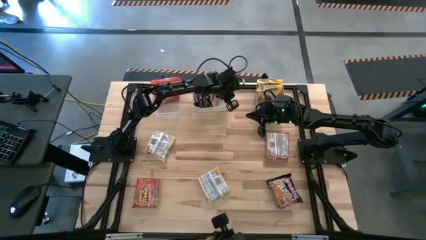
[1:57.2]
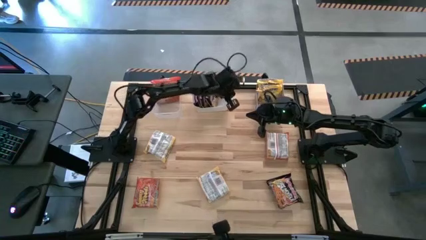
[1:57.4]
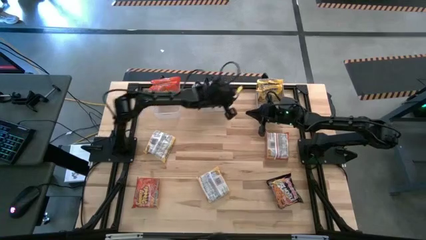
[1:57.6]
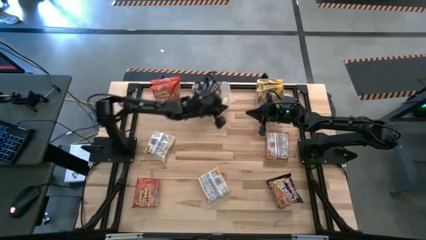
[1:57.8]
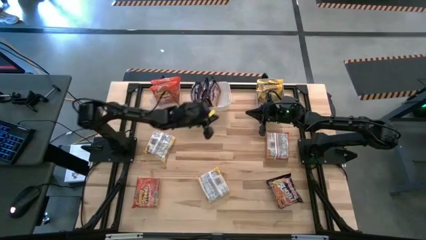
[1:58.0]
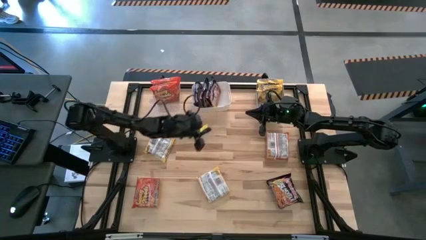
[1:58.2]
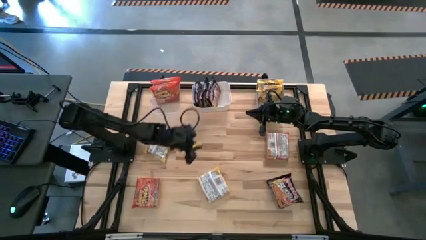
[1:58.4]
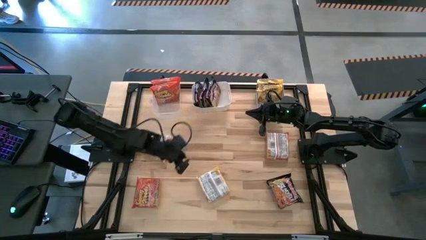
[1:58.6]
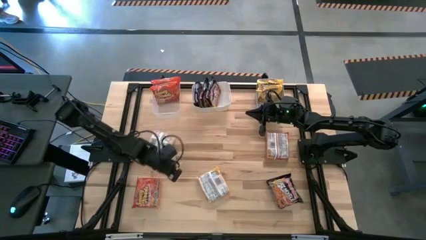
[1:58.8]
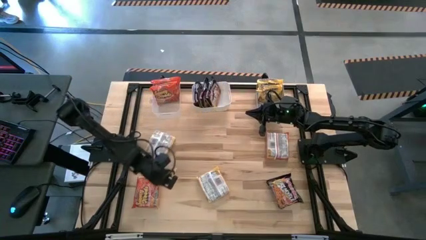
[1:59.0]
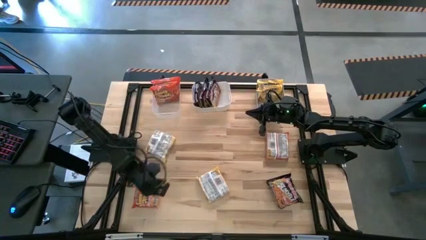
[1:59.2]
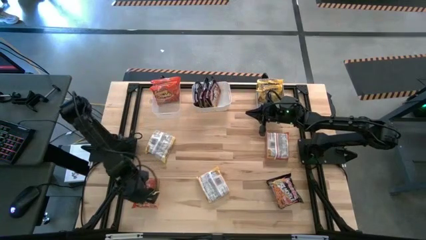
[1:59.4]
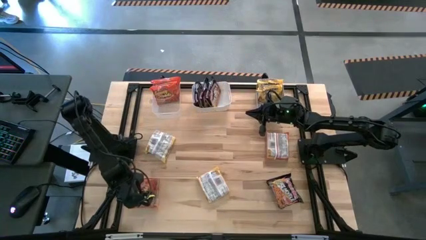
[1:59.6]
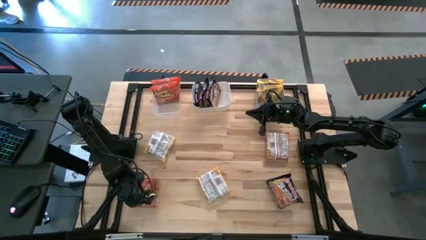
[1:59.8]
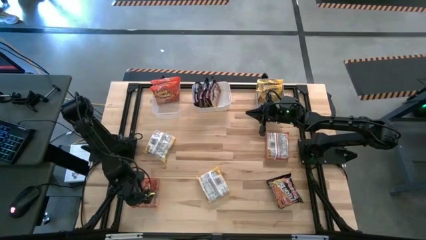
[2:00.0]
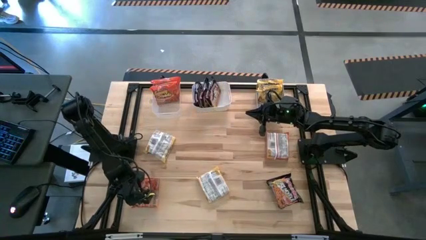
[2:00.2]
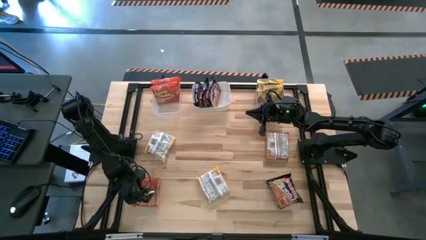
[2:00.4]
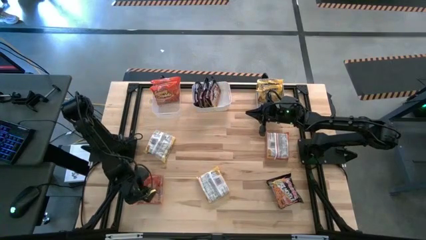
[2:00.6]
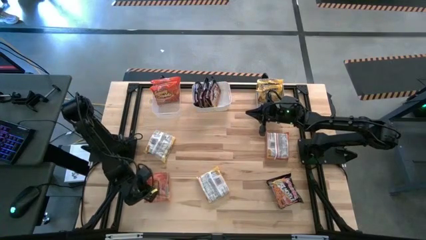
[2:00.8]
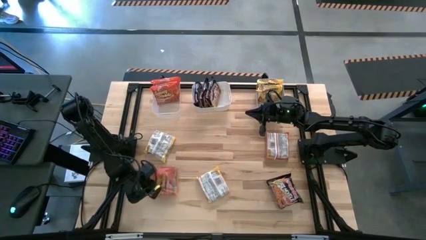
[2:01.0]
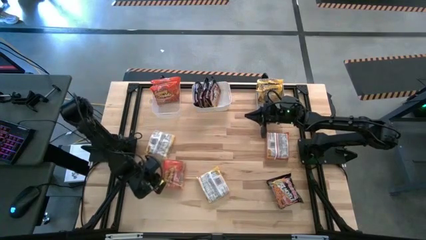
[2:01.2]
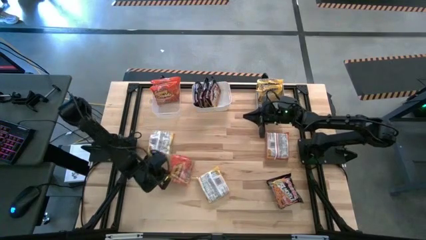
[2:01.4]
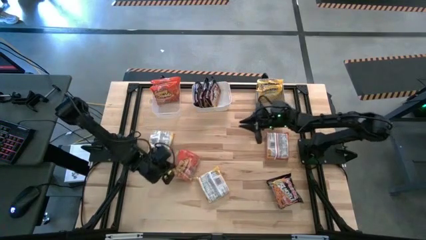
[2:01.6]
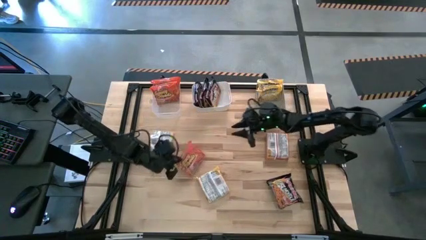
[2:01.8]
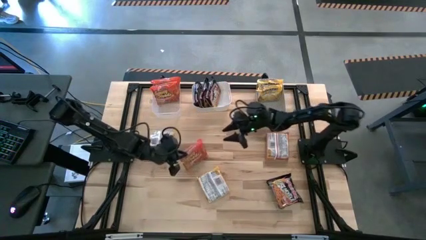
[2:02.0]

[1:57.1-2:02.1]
Task: Sort Maruchan noodles
Put the orange noodle pack into the transparent bin

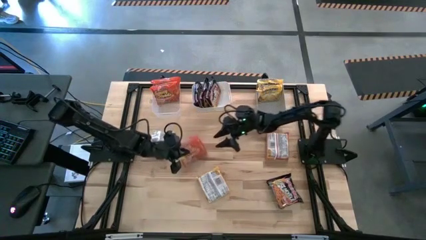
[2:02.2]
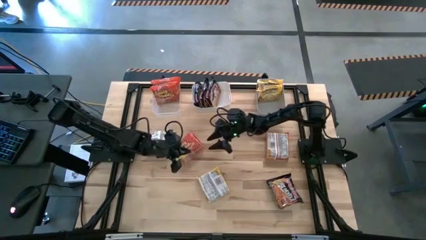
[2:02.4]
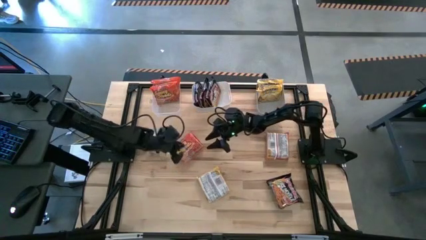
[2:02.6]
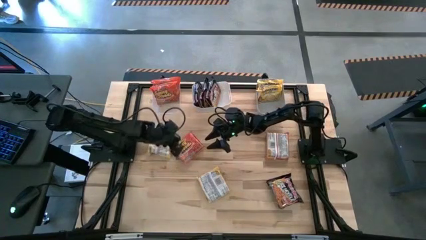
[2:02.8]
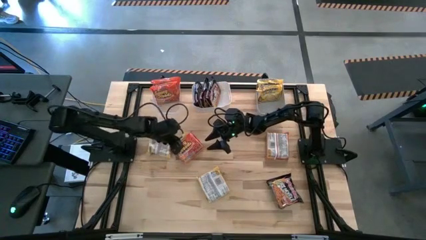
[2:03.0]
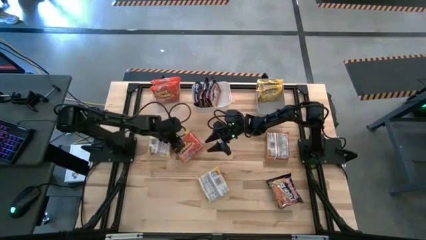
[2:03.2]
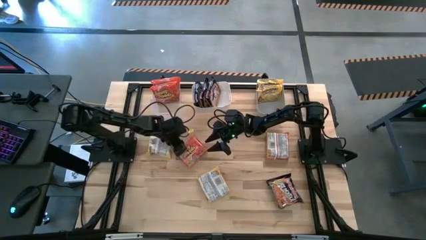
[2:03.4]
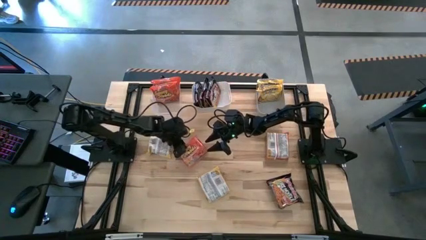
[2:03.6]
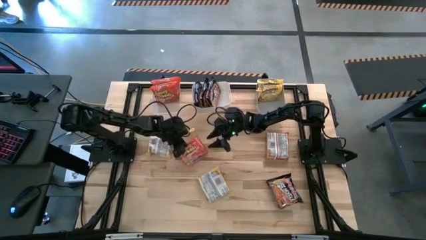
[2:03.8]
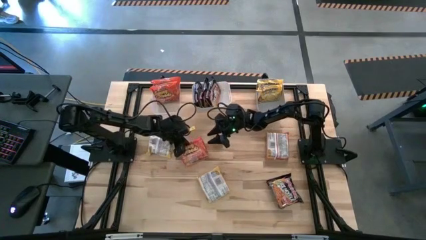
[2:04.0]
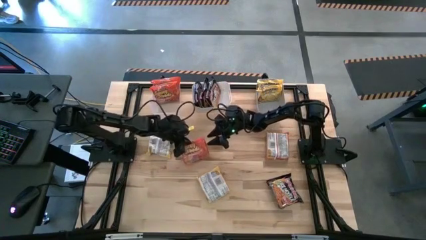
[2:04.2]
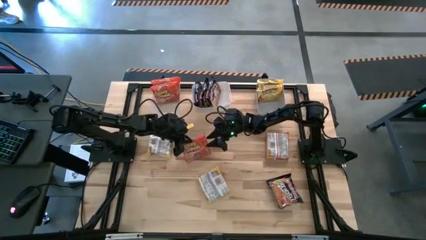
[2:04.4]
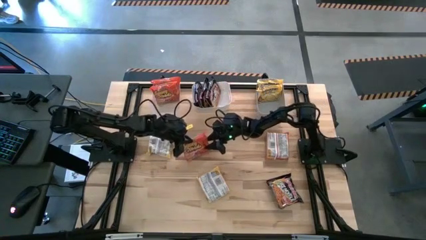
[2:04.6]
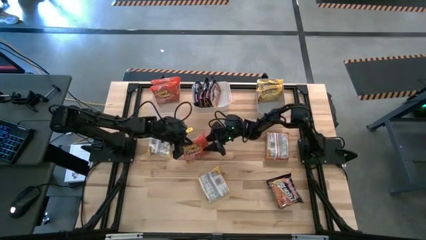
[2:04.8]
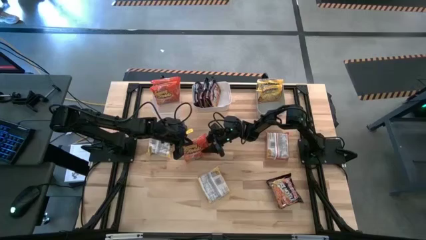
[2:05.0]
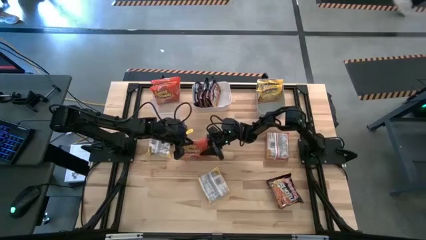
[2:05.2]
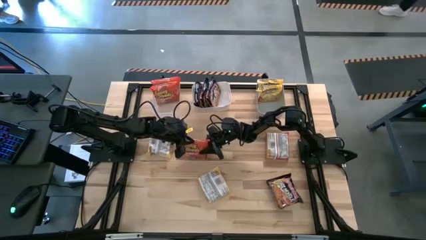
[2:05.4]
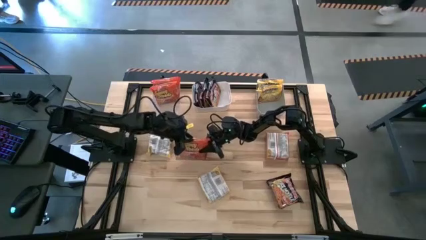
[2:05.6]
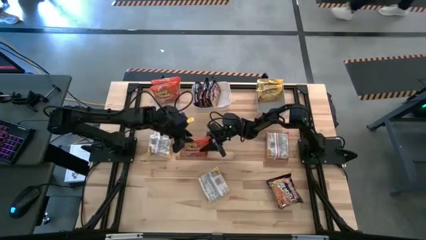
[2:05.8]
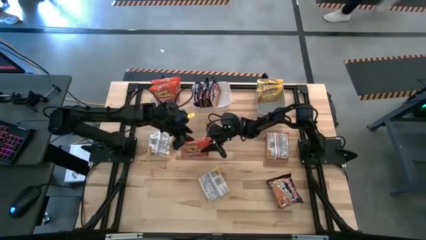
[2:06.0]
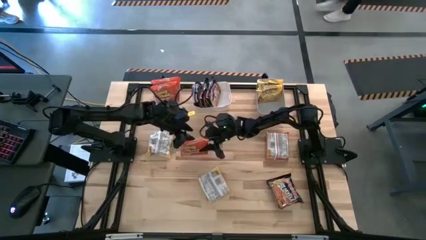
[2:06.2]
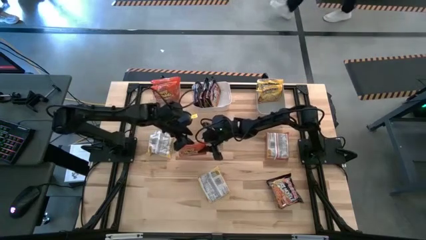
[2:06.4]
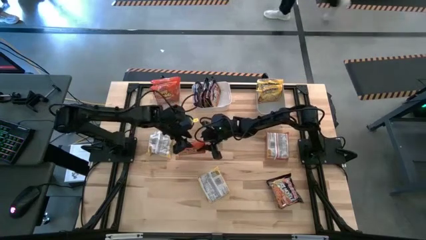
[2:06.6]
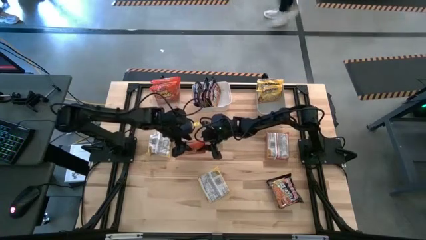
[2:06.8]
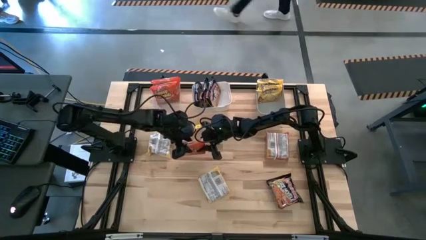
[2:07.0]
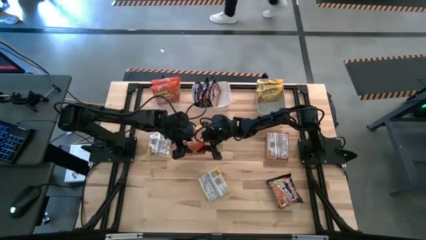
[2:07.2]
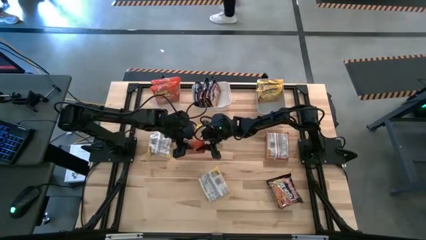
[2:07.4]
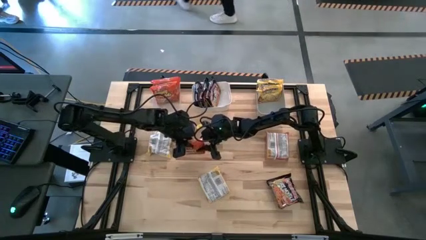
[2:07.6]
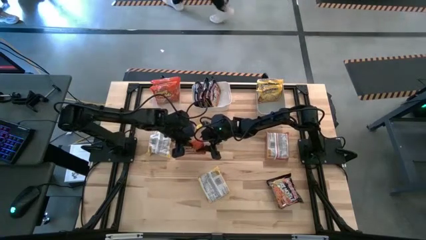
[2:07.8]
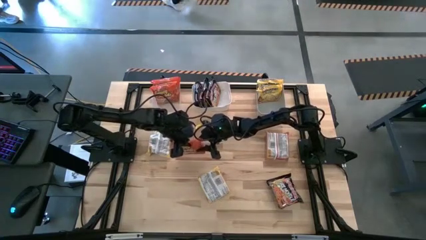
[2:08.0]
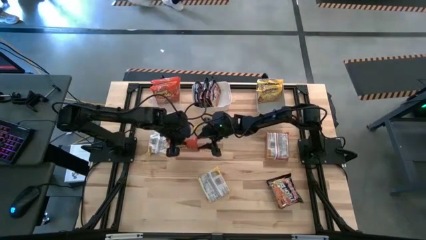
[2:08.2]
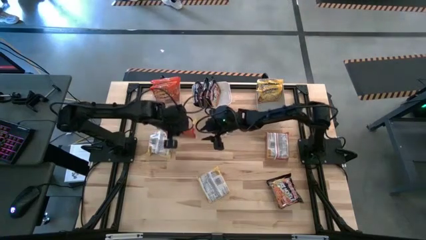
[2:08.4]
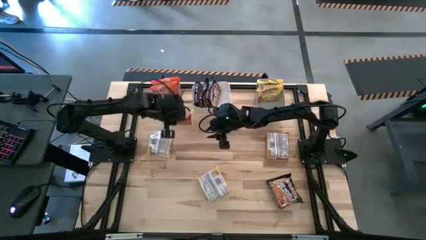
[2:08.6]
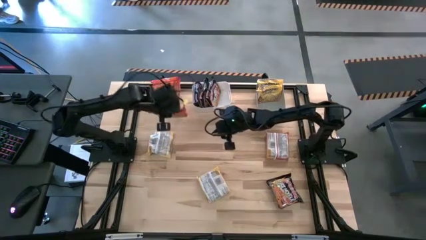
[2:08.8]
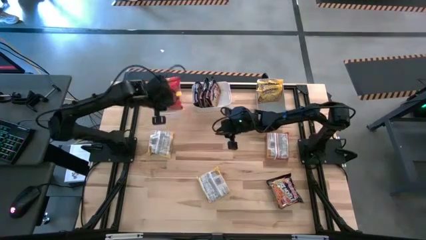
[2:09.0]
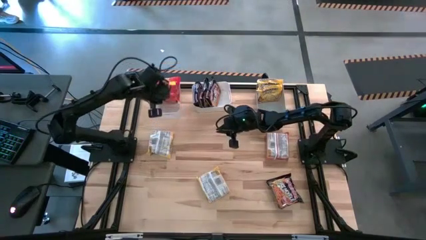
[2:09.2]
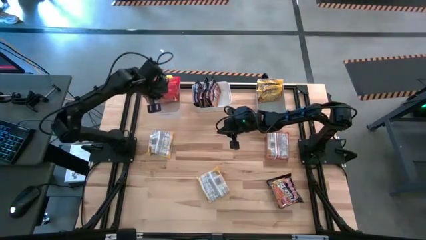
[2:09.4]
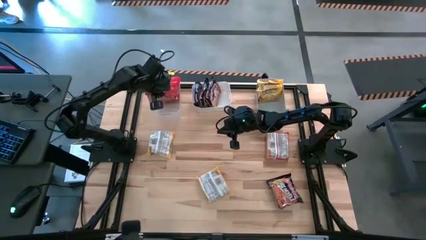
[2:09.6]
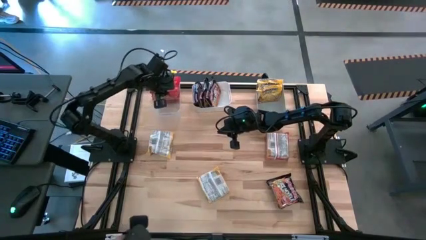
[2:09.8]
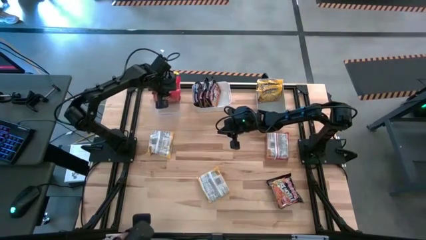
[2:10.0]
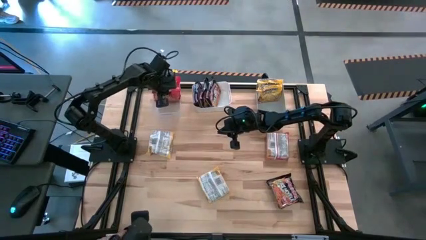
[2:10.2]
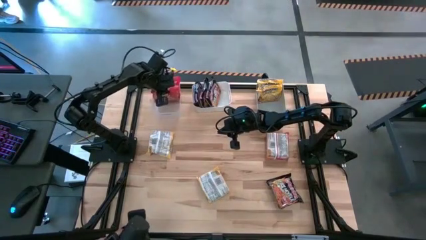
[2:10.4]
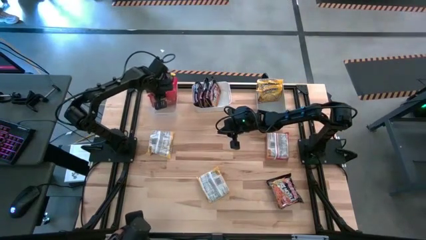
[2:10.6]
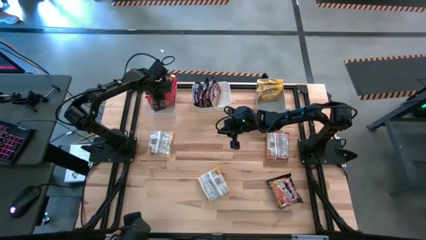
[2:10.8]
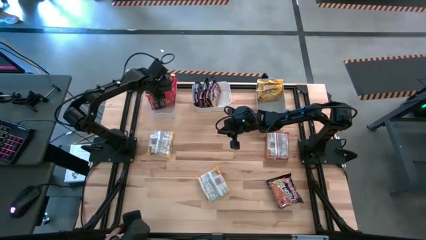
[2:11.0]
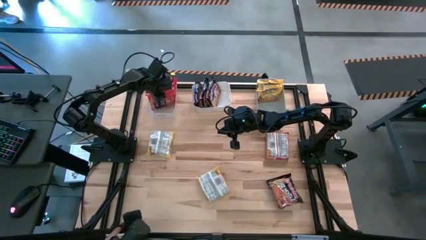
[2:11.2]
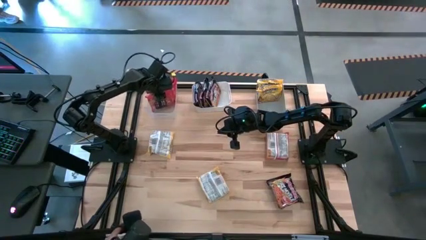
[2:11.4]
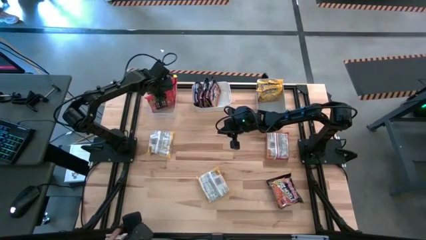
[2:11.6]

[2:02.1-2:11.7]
Put the orange noodle pack into the transparent bin

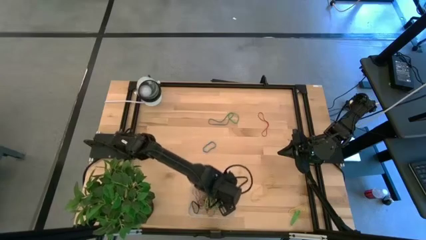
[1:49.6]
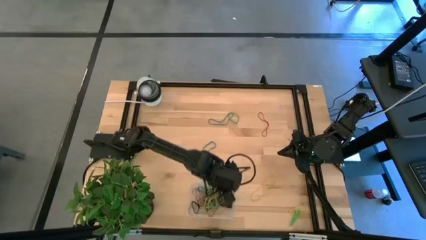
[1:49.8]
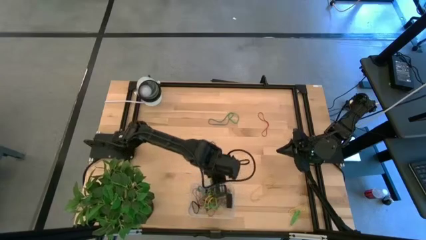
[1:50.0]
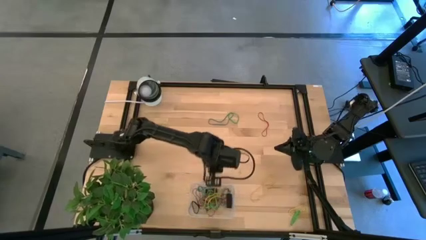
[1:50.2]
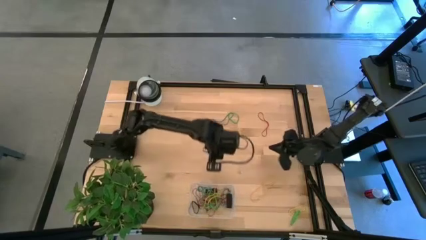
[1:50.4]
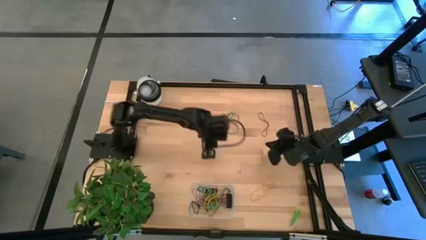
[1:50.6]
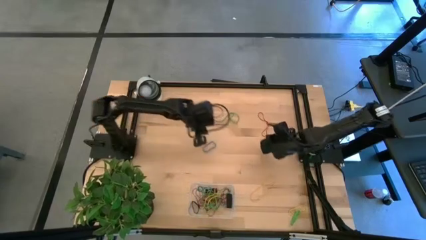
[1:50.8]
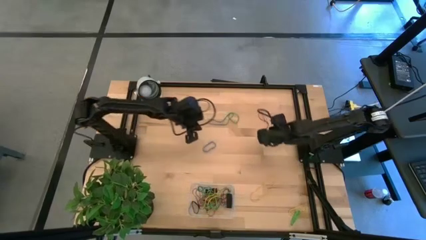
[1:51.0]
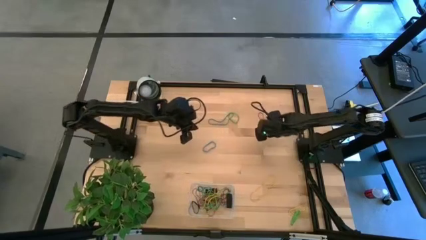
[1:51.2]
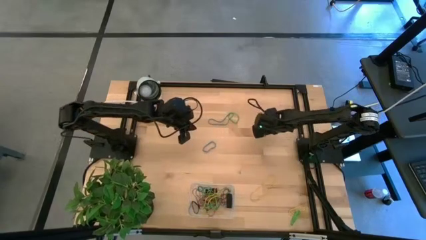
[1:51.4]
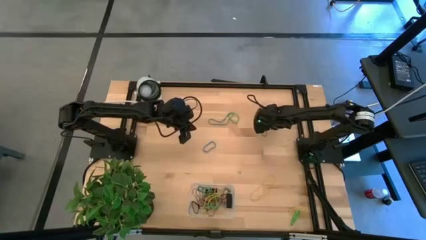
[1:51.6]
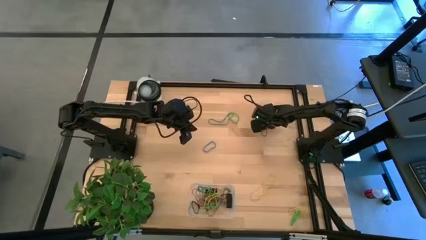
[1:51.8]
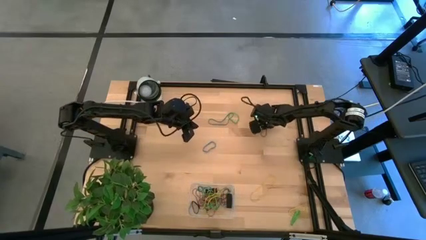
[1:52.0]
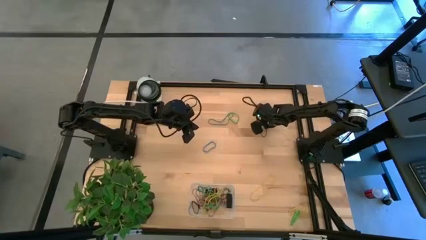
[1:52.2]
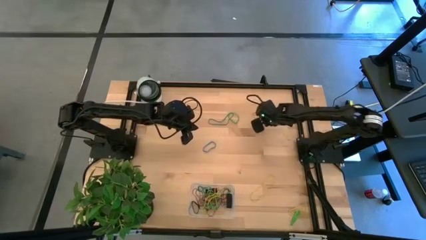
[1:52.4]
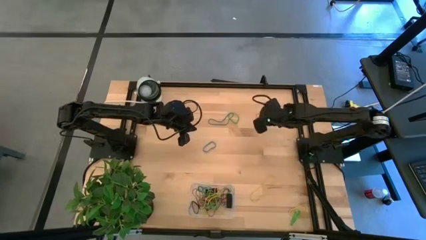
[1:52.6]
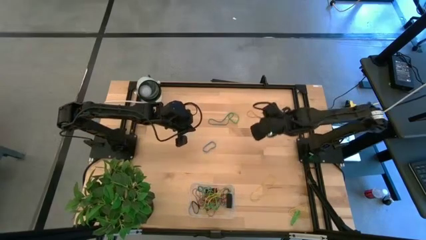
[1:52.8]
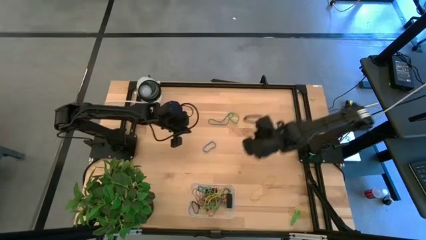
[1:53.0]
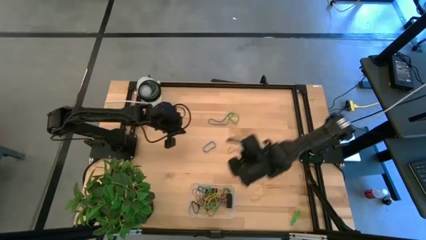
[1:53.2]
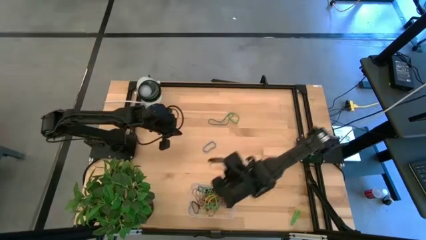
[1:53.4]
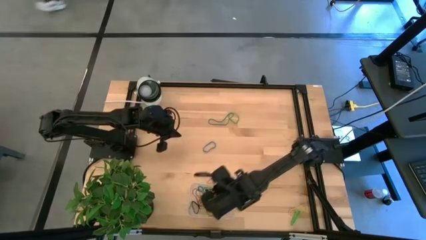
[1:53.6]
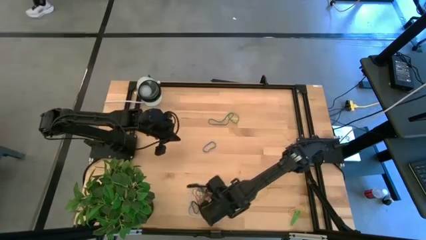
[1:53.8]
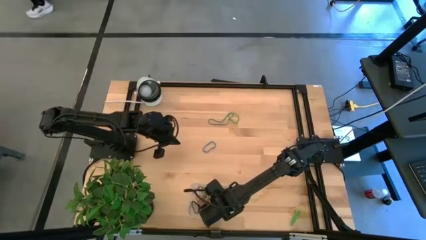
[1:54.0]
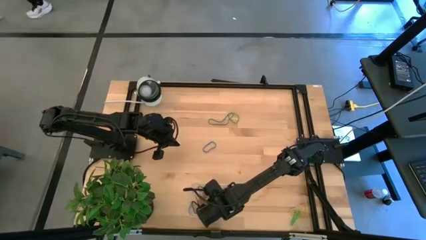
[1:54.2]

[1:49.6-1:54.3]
Task: Pick and place rubber bands into bin
Put the red rubber band into the transparent bin
